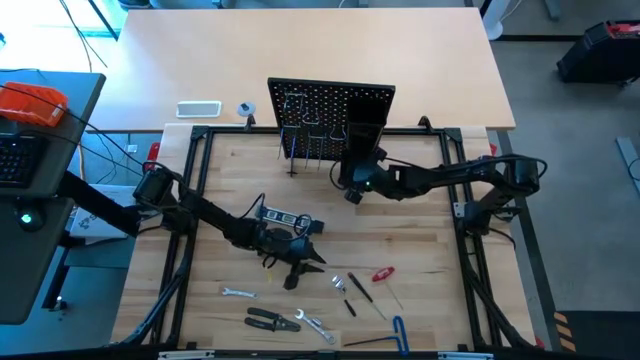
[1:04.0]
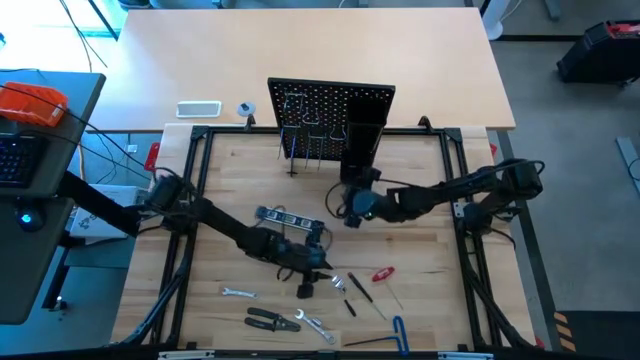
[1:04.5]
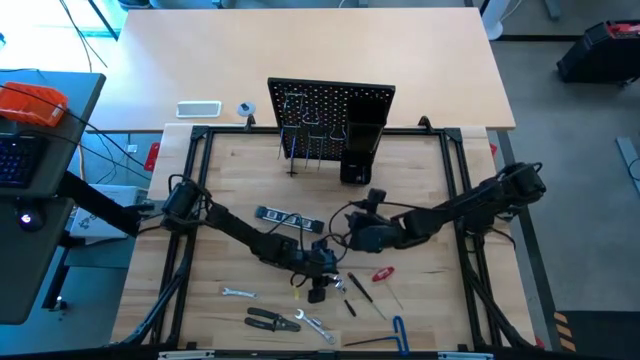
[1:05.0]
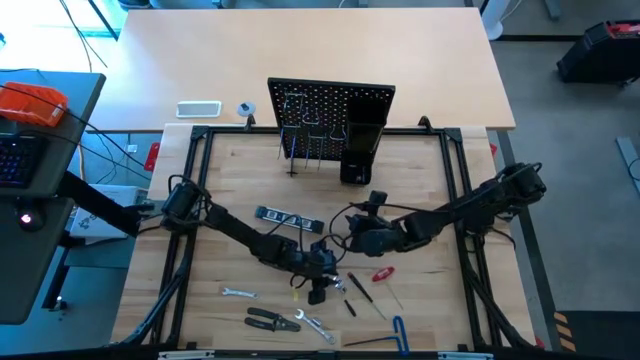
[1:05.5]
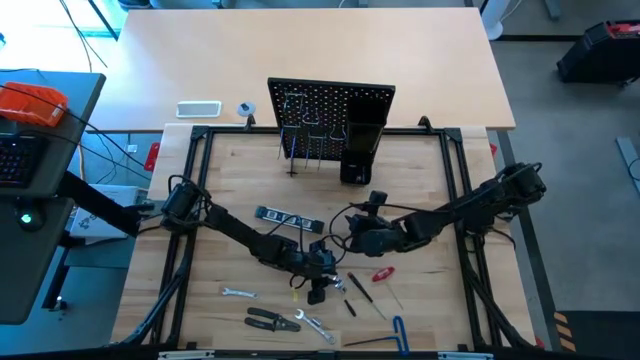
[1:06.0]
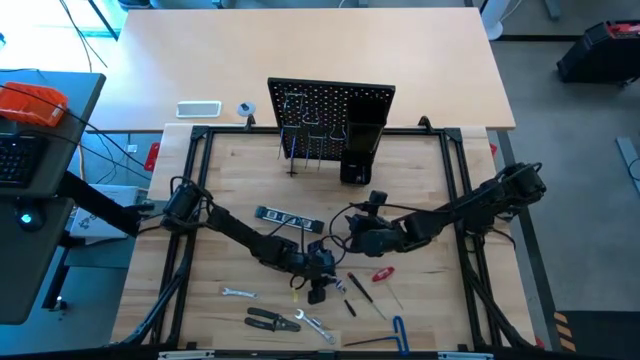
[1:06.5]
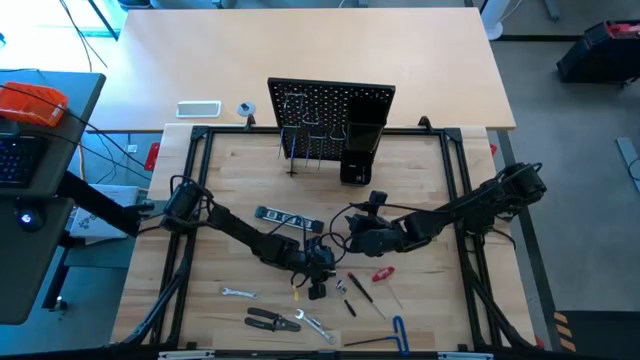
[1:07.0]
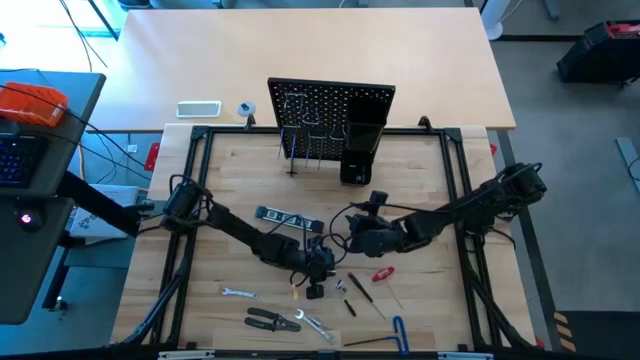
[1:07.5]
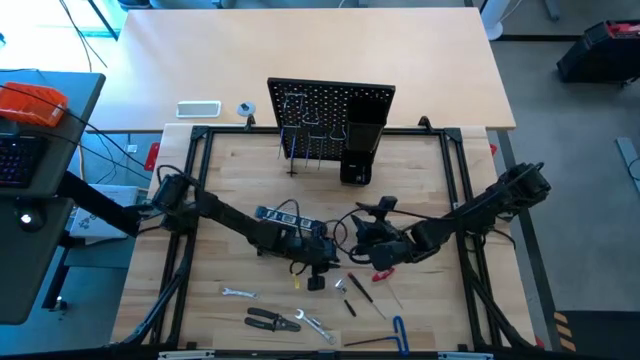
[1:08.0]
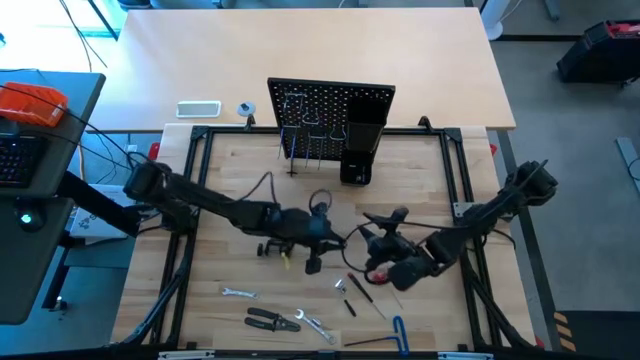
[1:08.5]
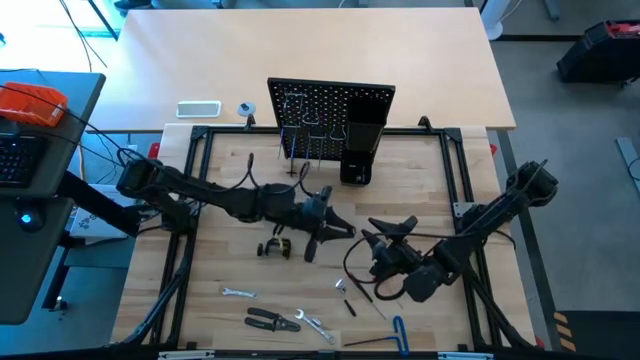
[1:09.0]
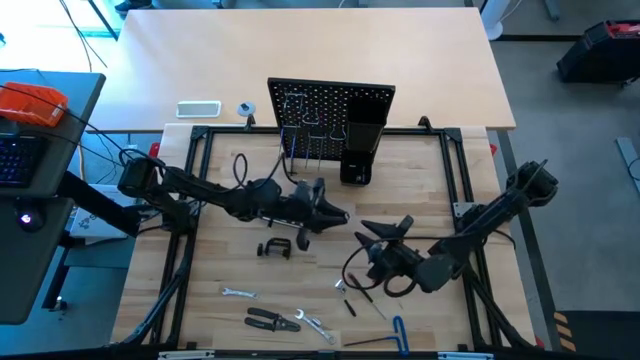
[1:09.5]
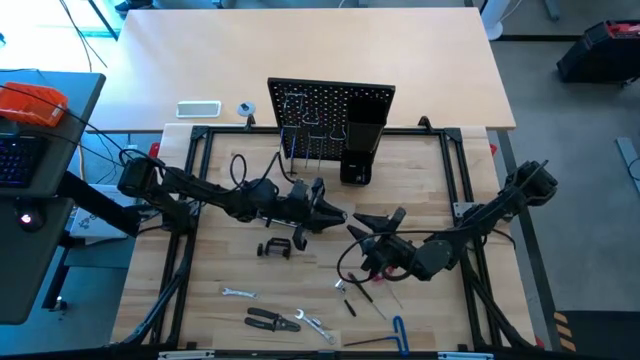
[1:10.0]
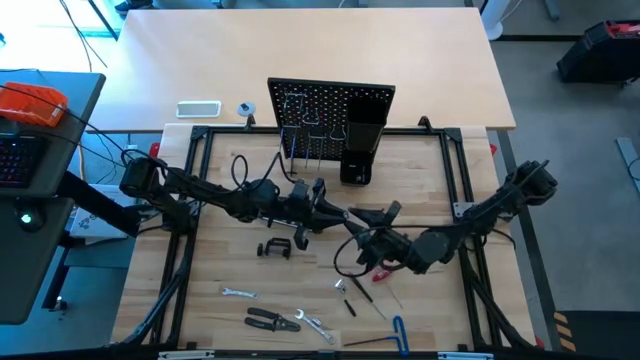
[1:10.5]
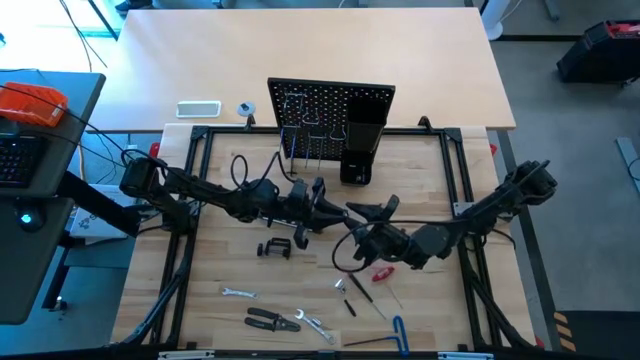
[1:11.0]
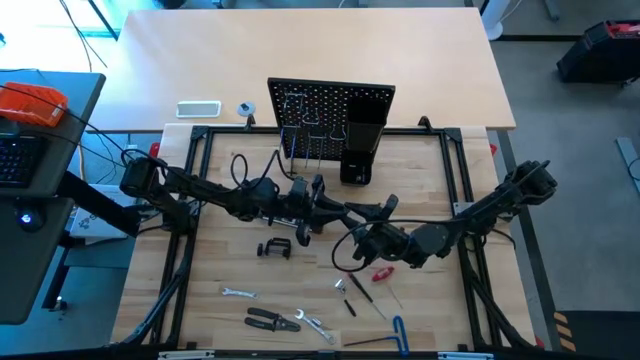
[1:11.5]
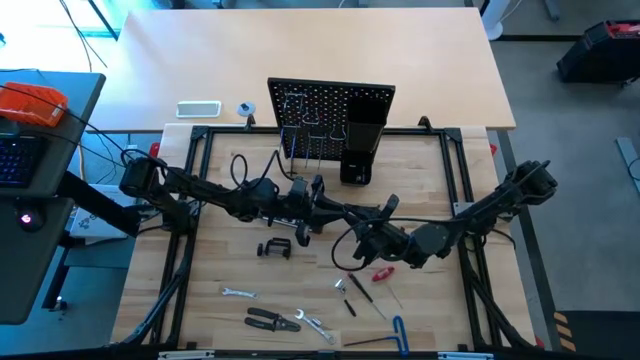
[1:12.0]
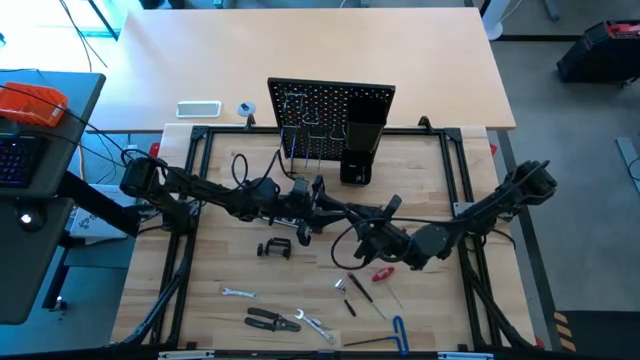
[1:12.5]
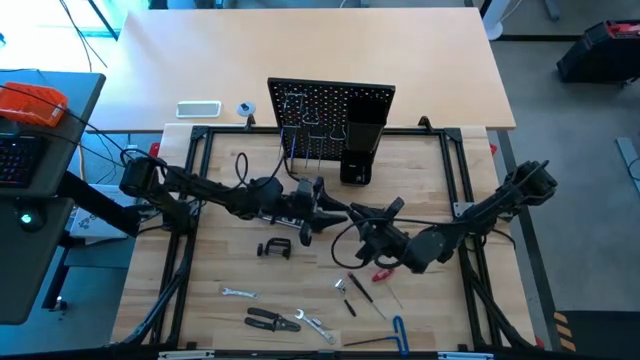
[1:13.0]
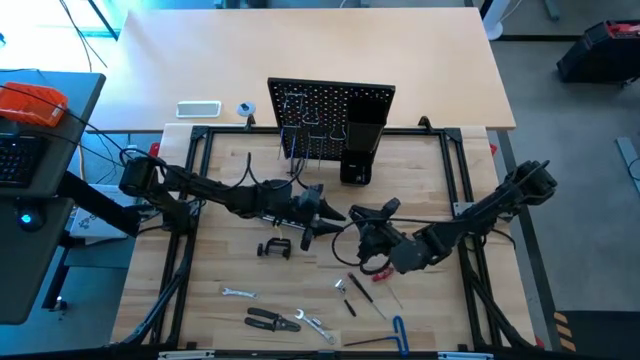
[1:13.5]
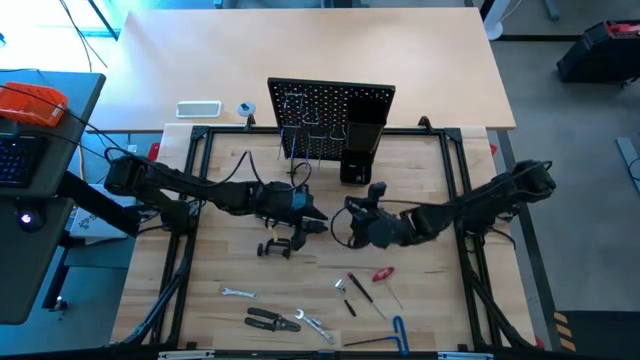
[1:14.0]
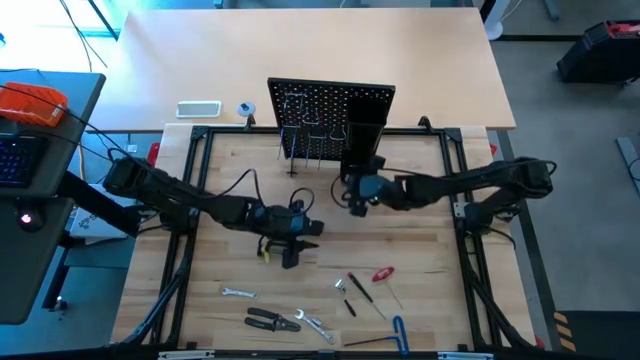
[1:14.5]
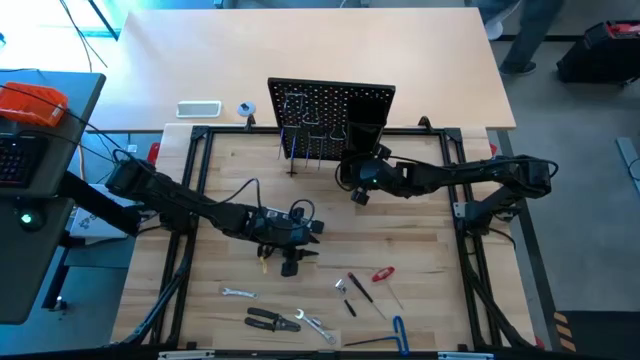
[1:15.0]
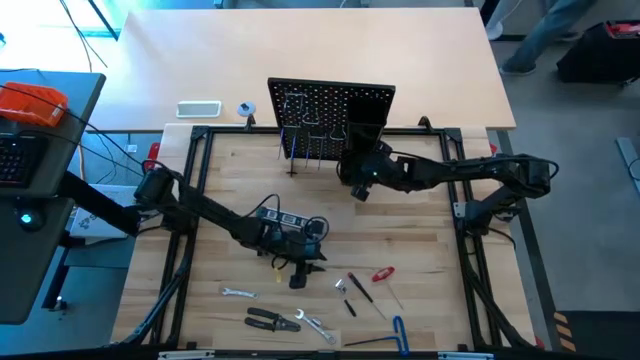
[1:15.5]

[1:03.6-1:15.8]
Task: Hang tools onto peg board
Put the top left socket into the bottom peg board bin

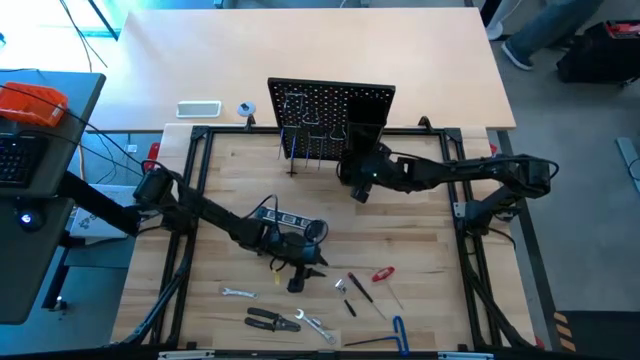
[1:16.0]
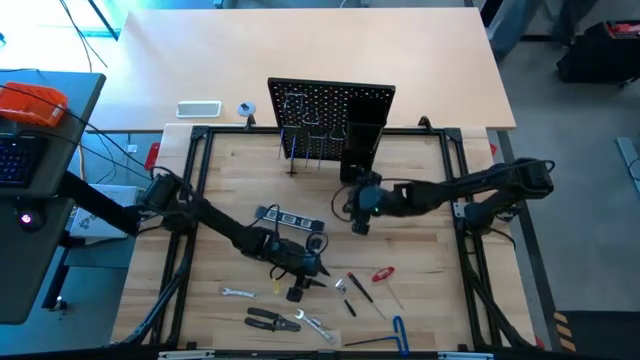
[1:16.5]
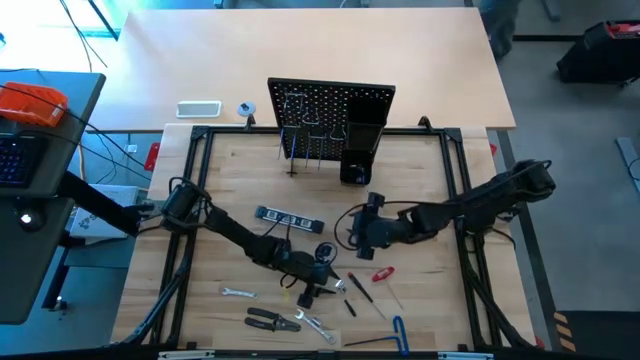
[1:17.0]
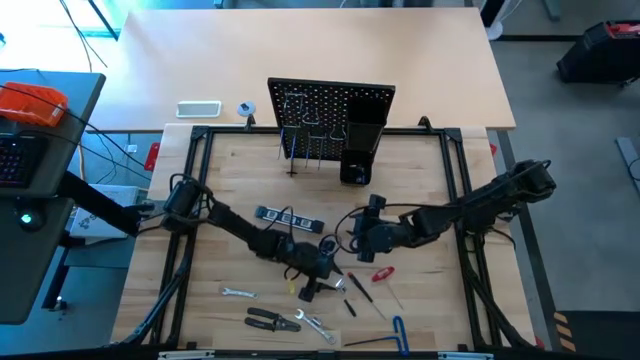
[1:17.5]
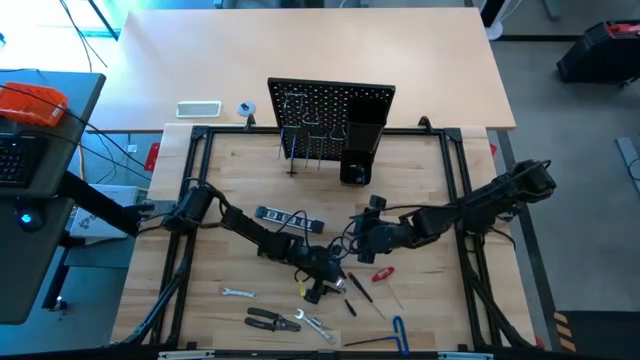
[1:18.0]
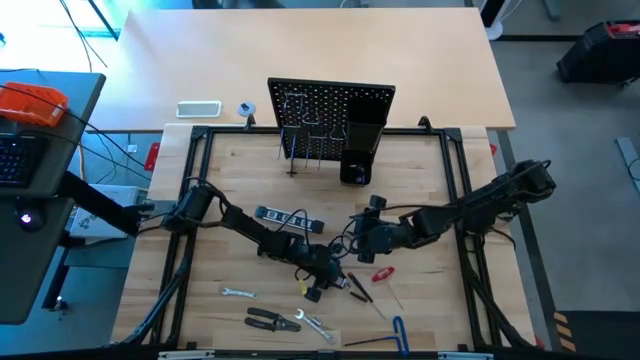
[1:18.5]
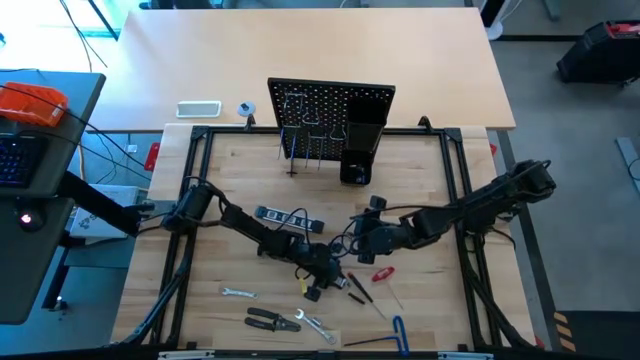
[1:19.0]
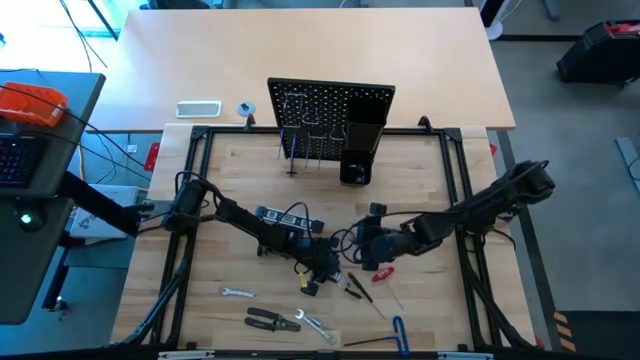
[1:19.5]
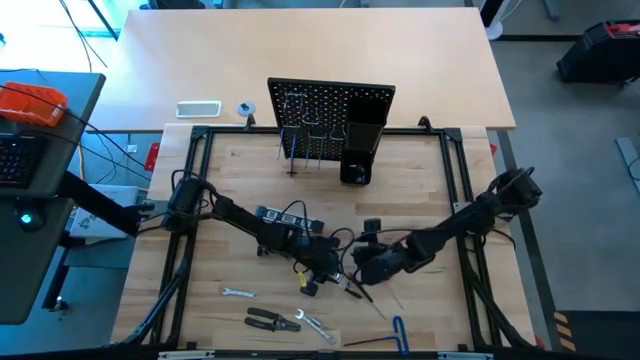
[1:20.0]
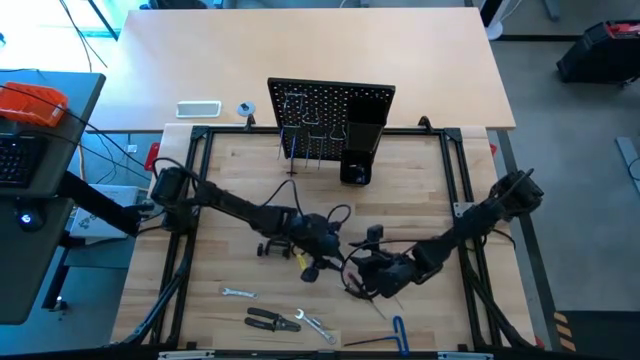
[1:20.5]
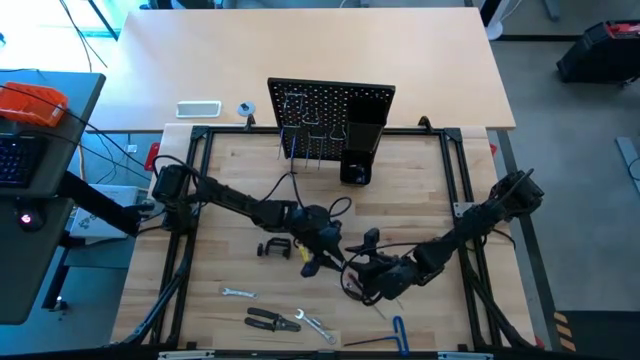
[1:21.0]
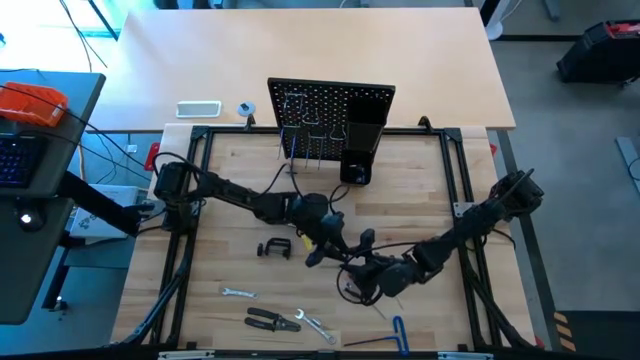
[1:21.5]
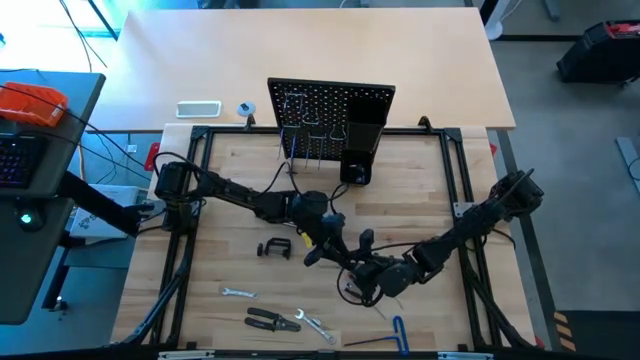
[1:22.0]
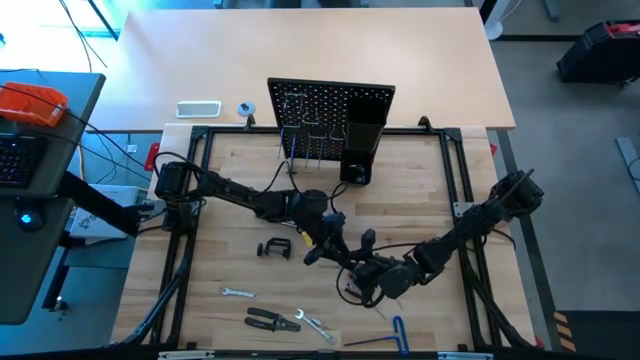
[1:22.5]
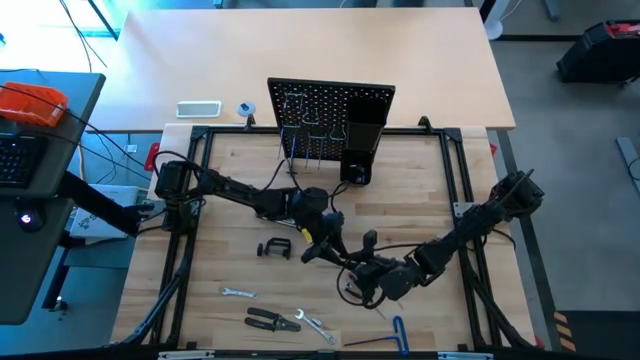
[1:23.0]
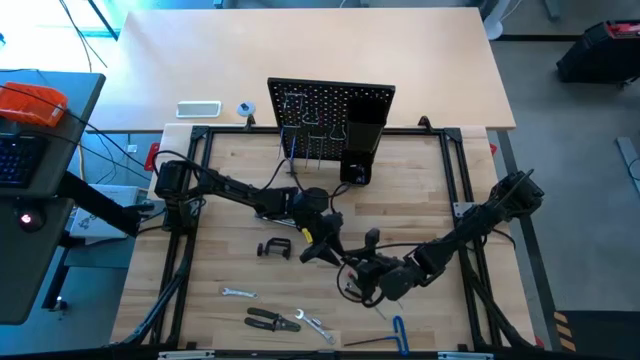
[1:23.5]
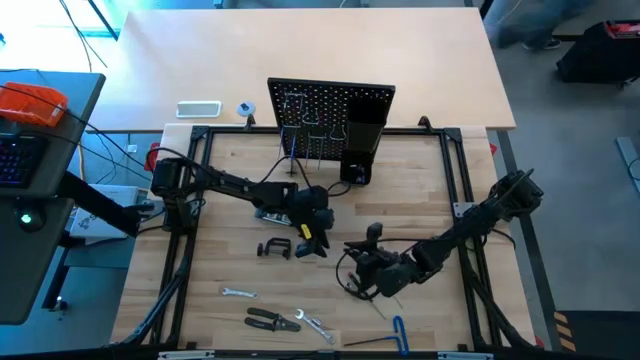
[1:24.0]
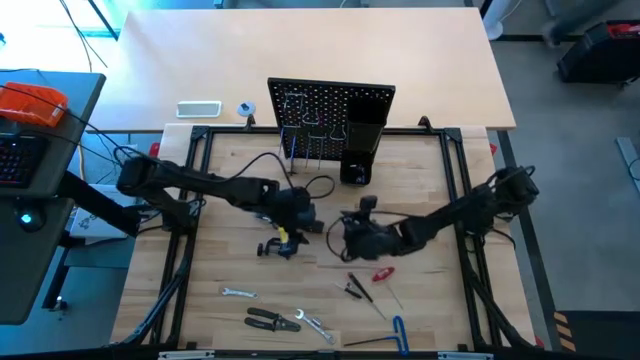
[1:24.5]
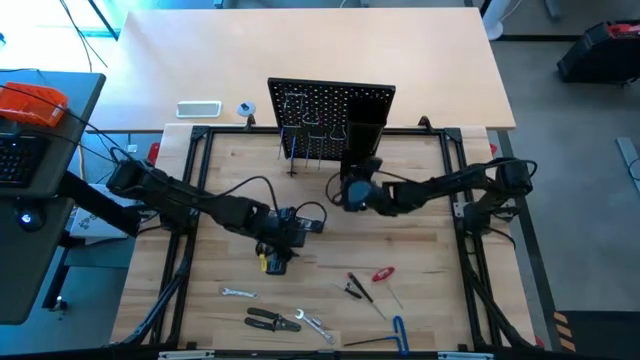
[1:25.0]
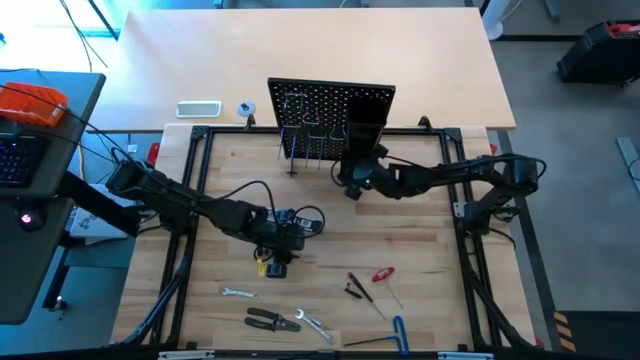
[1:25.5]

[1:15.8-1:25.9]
Put the top left socket into the bottom peg board bin
